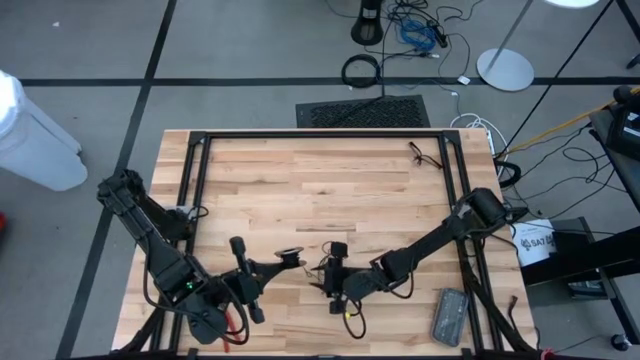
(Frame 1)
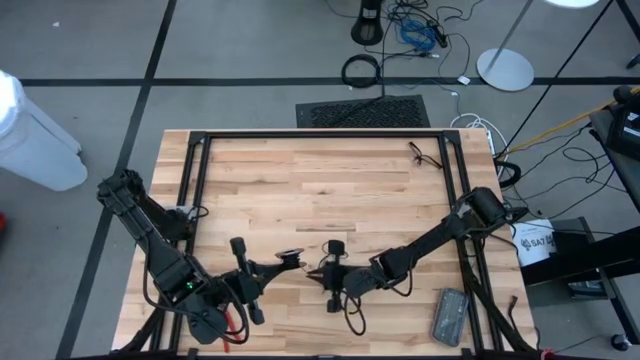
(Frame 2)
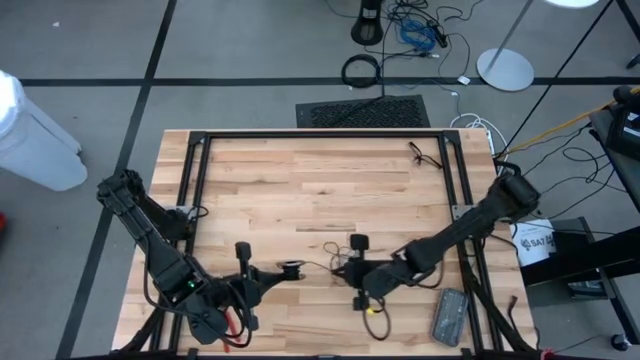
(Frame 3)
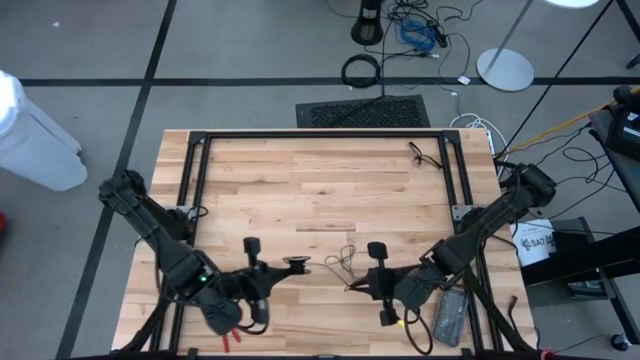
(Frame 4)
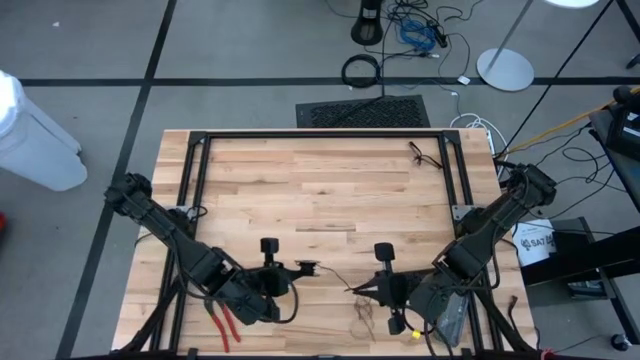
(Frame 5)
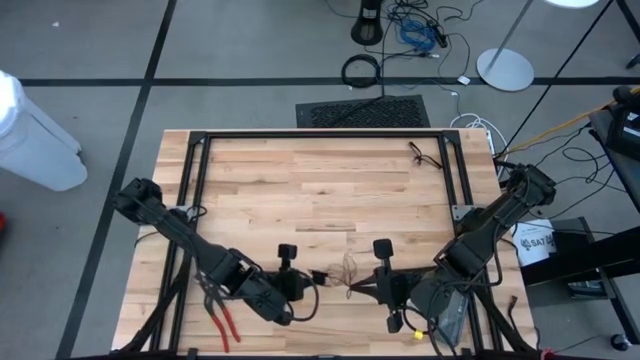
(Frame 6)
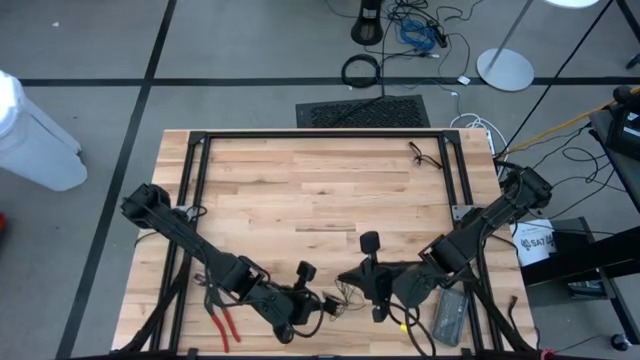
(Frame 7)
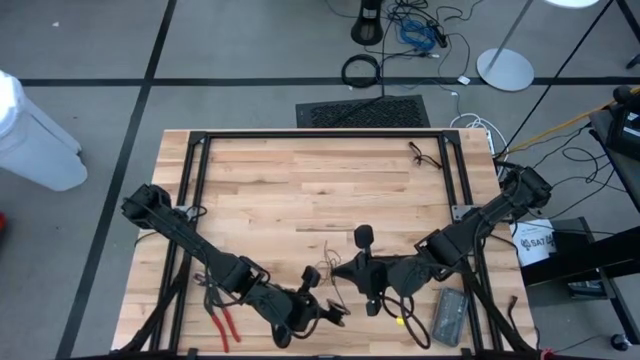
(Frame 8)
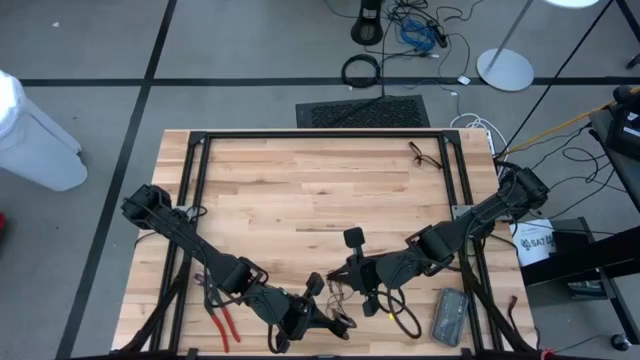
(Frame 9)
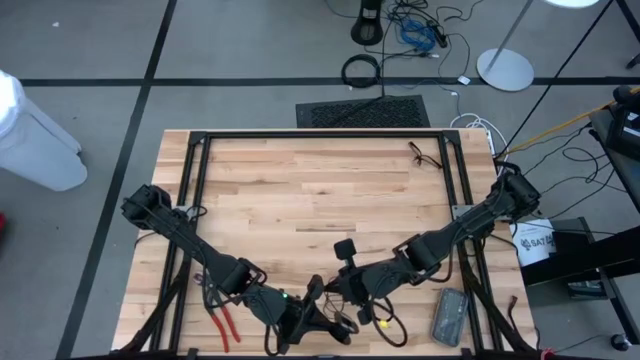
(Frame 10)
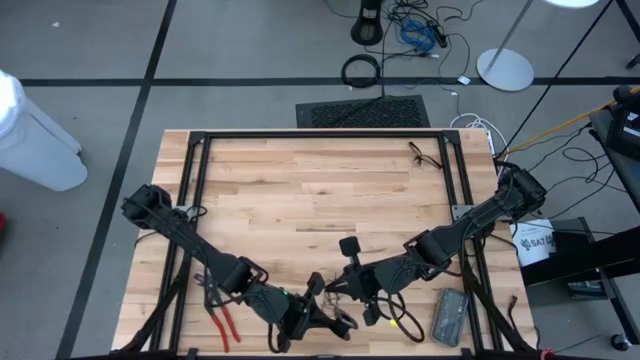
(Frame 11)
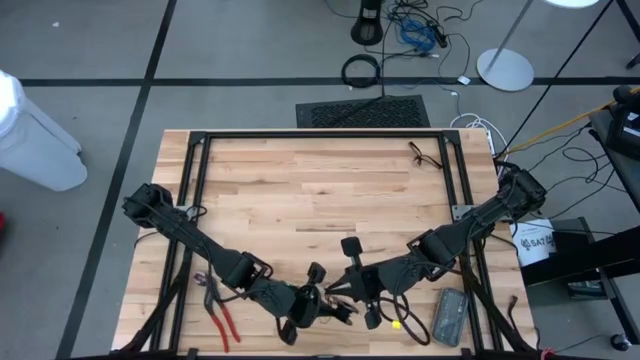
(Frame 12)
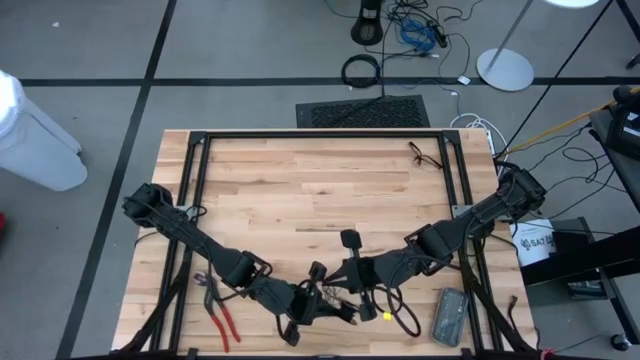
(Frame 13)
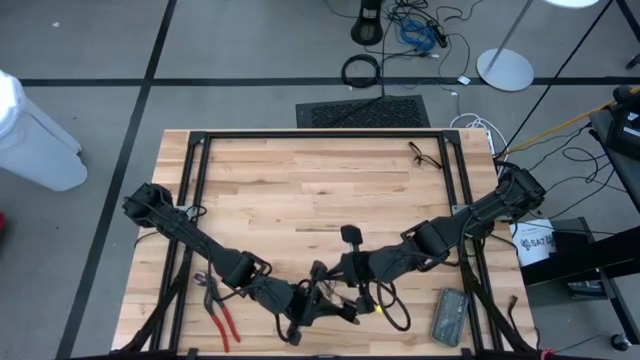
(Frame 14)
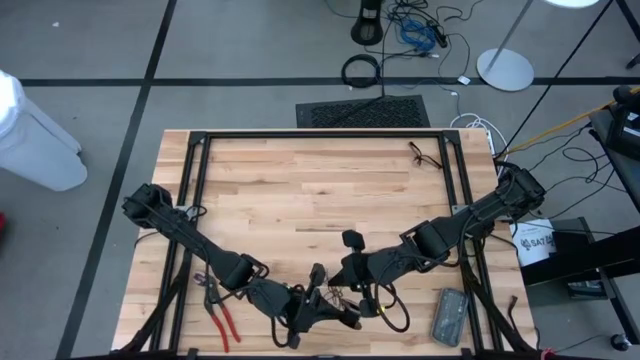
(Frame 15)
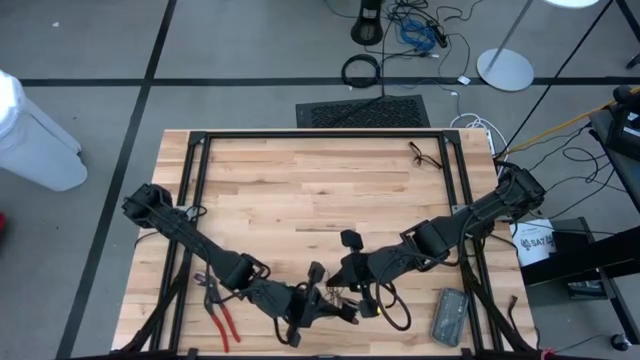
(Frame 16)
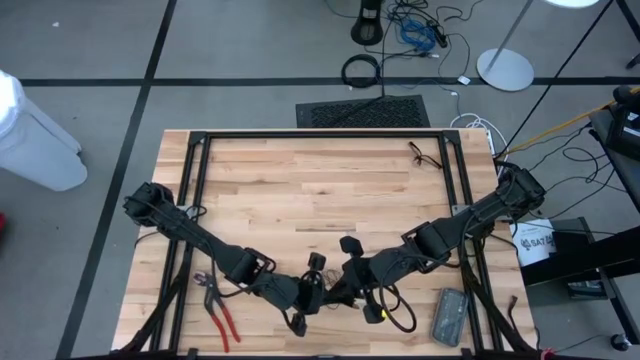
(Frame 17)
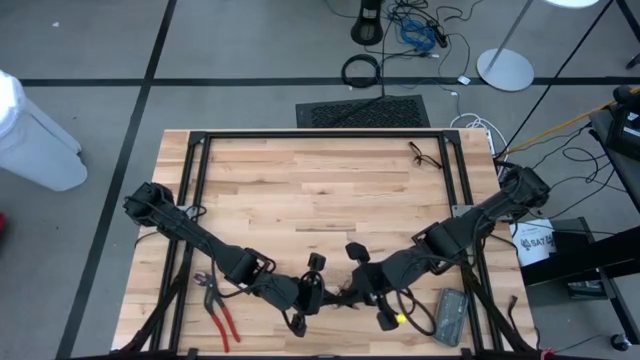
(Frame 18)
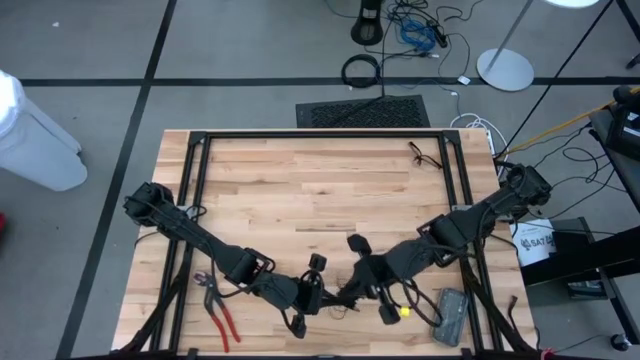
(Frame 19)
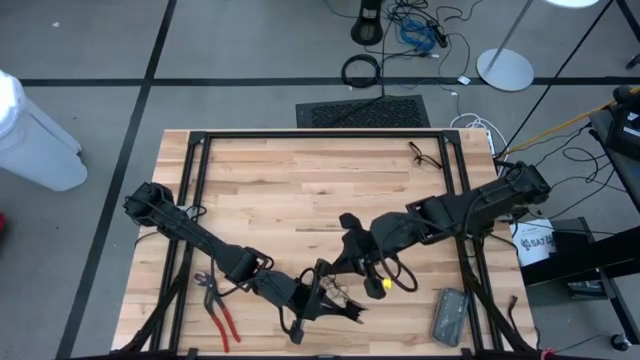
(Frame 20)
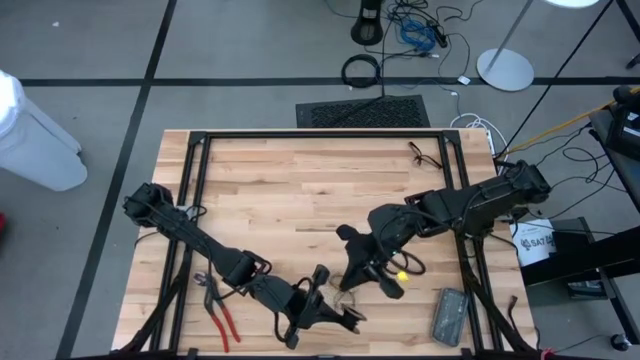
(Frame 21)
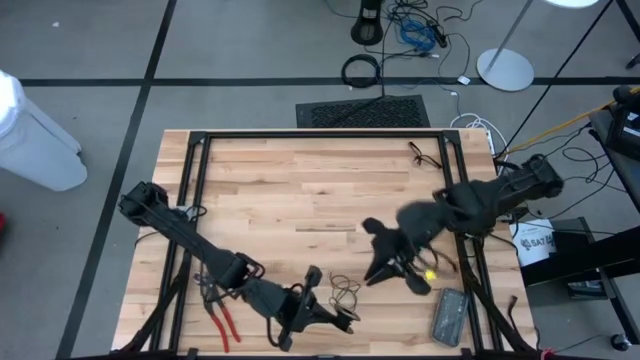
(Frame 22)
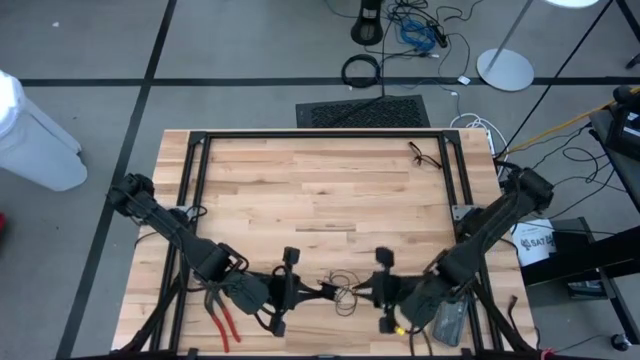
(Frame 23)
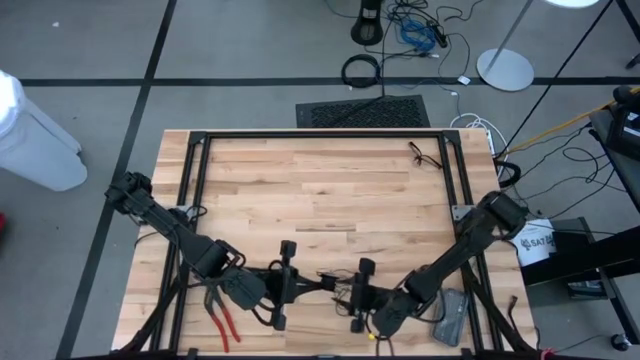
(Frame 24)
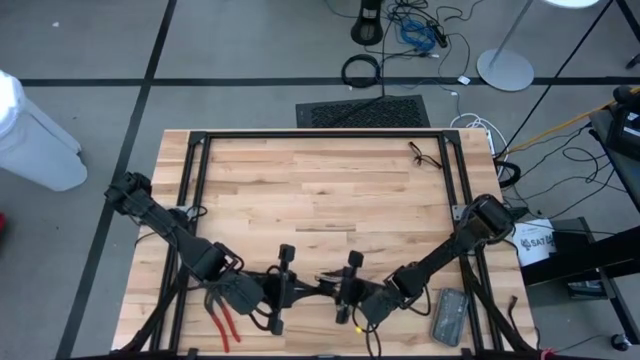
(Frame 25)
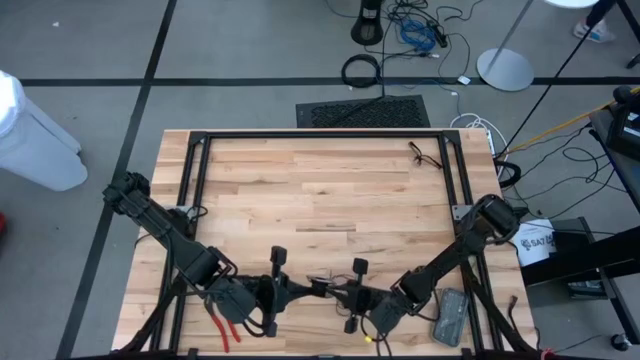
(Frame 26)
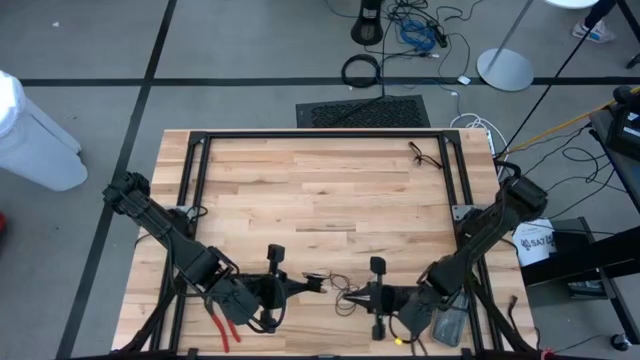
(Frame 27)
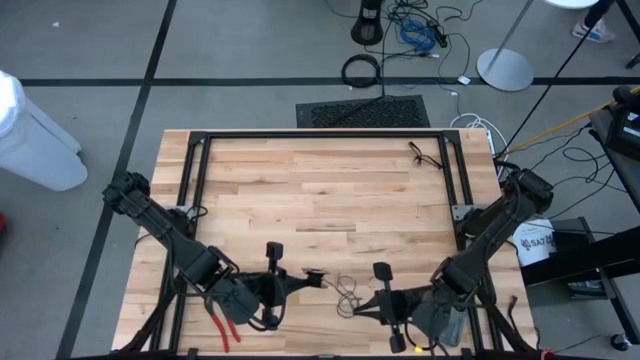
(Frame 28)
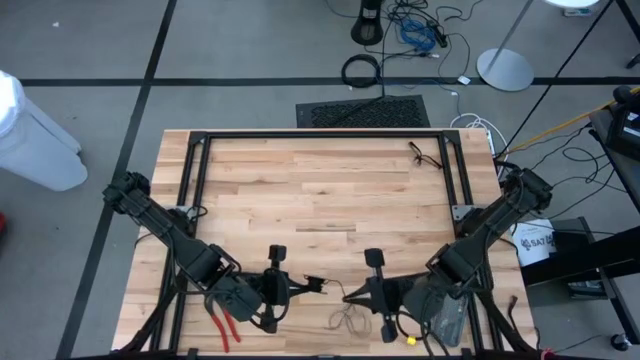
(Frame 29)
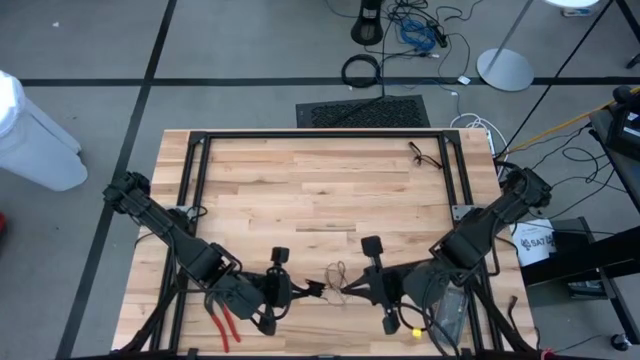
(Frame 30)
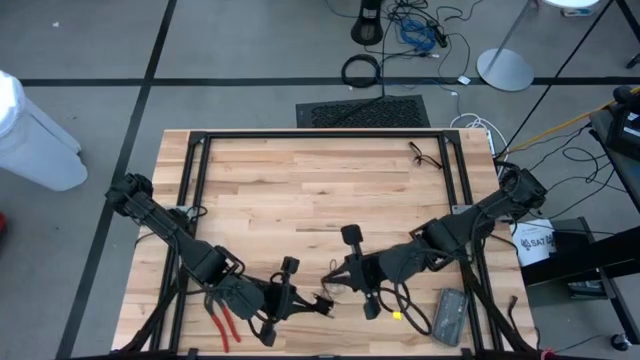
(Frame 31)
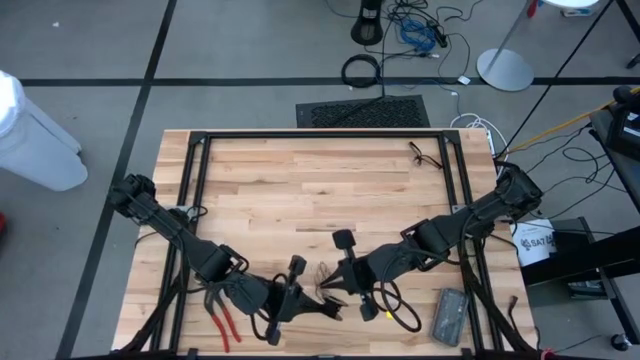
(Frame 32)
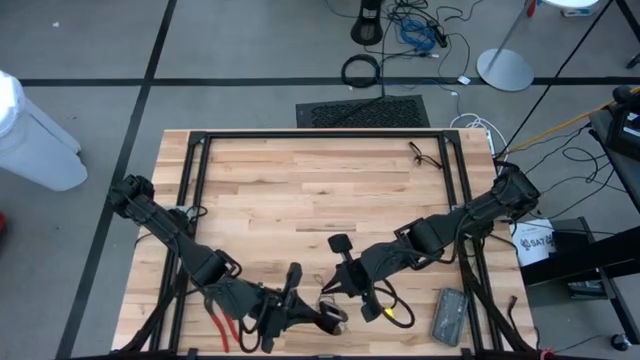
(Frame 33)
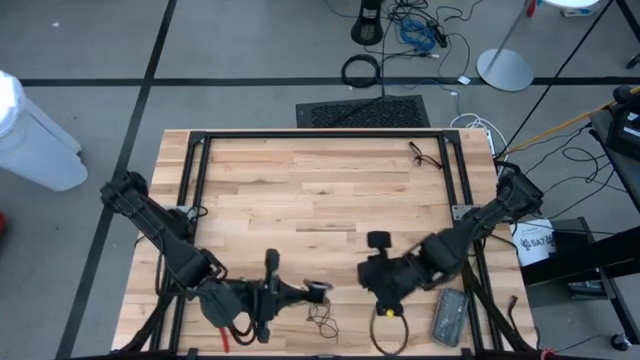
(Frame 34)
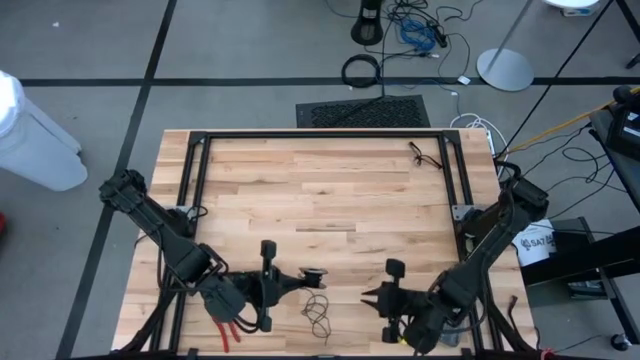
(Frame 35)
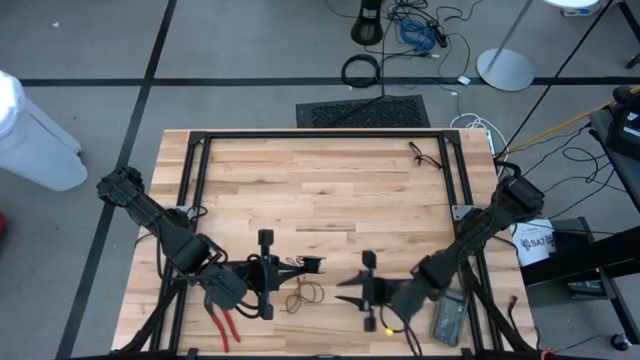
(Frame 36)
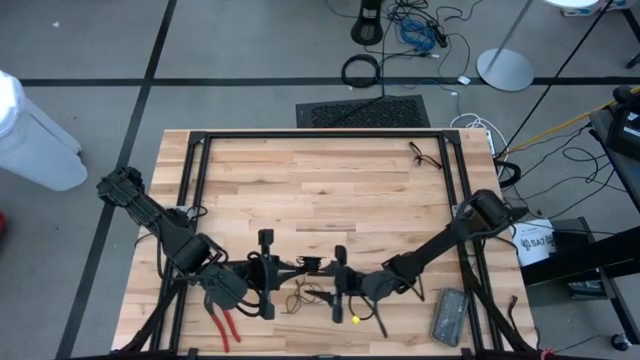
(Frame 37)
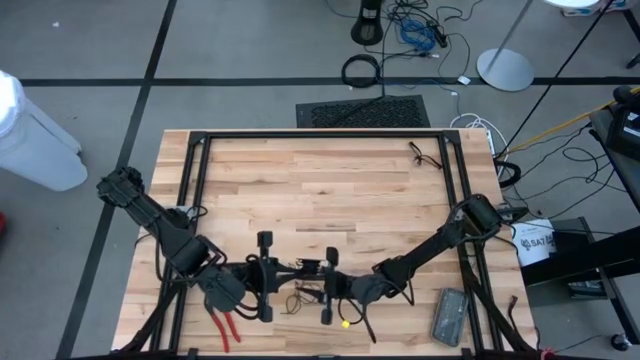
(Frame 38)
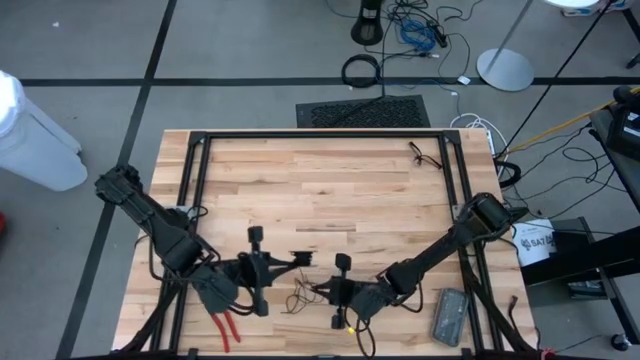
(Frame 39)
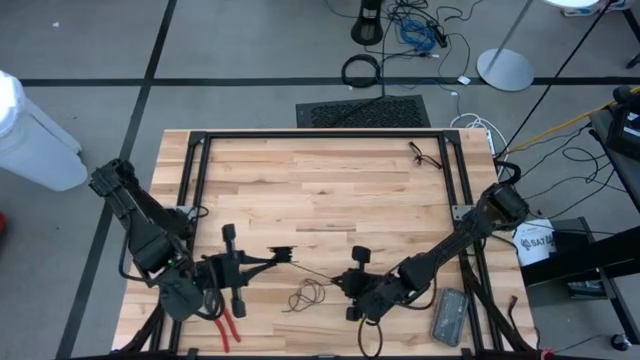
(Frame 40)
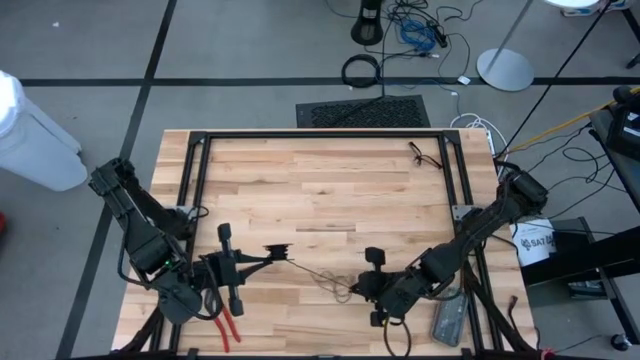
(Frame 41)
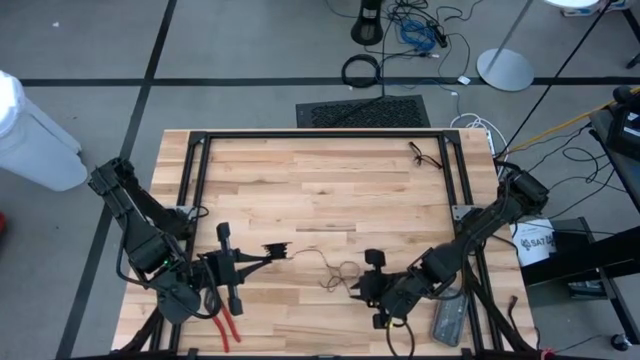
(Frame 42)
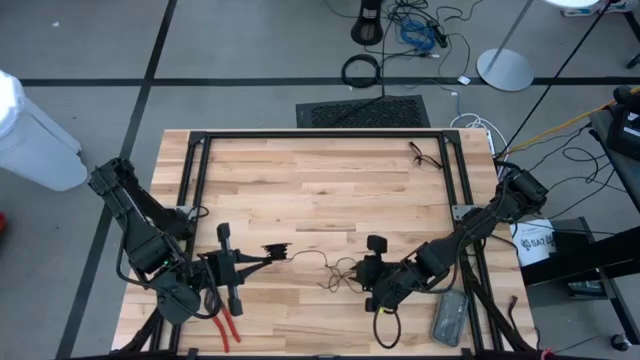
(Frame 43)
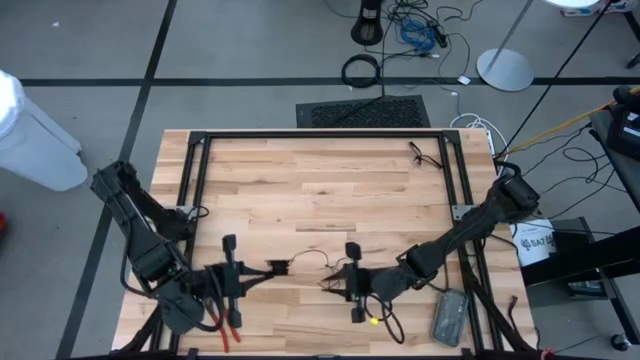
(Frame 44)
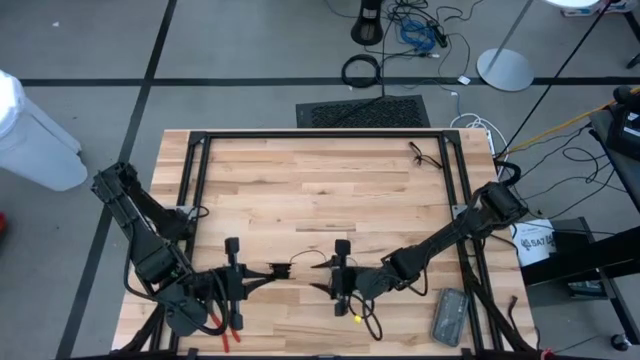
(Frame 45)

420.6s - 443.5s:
Task: Coil cords
Coil the black wire onto the black spool
